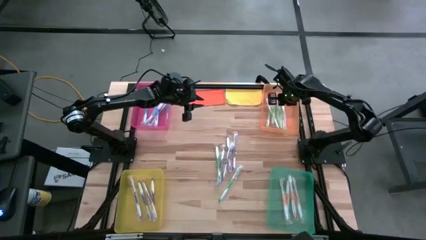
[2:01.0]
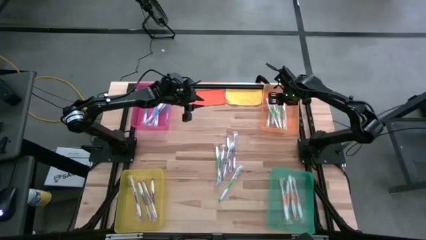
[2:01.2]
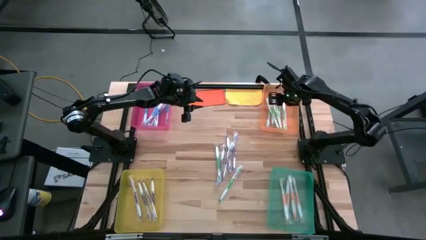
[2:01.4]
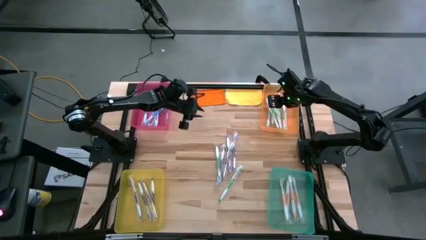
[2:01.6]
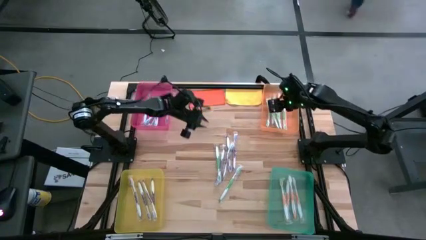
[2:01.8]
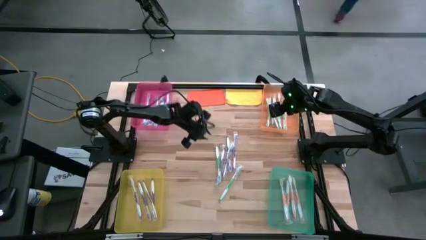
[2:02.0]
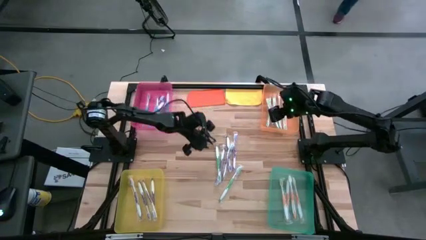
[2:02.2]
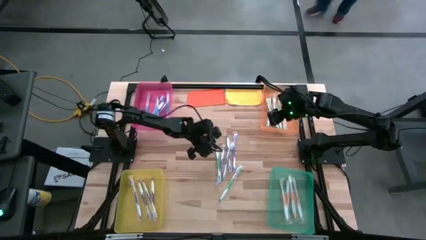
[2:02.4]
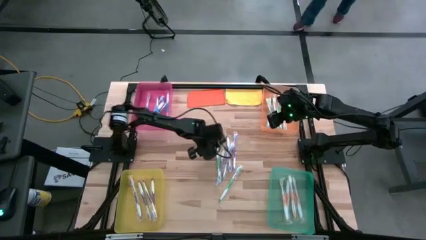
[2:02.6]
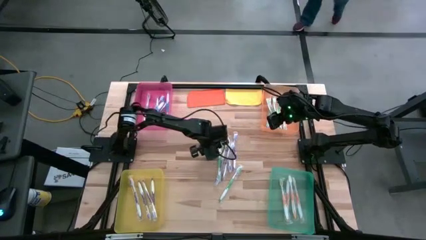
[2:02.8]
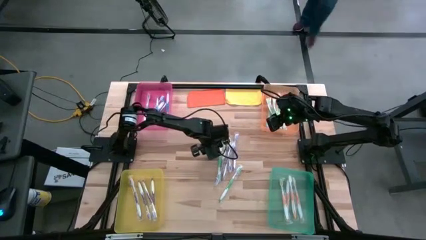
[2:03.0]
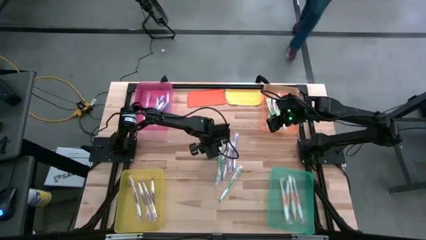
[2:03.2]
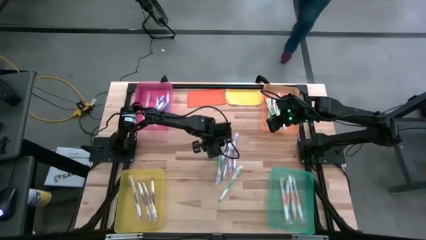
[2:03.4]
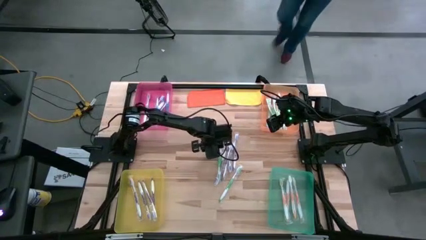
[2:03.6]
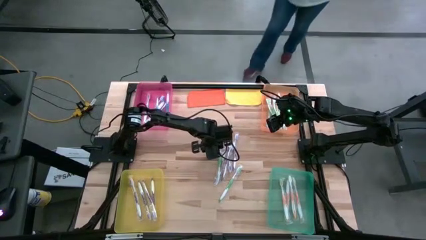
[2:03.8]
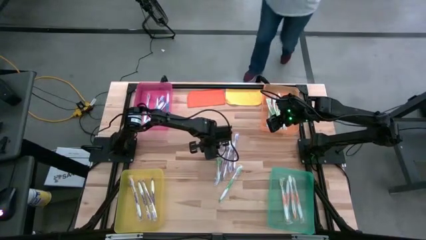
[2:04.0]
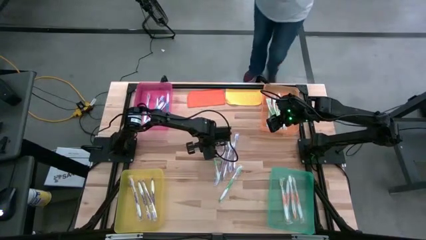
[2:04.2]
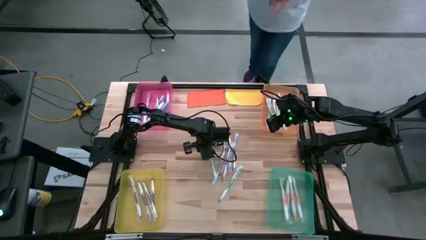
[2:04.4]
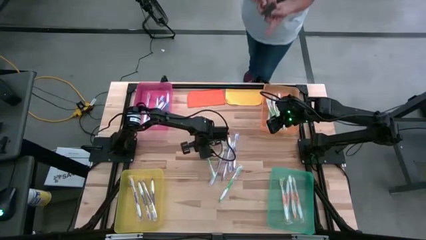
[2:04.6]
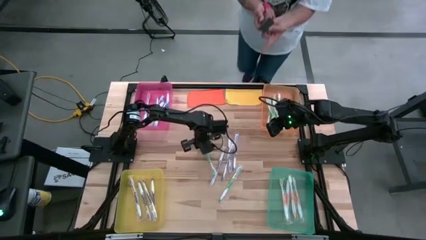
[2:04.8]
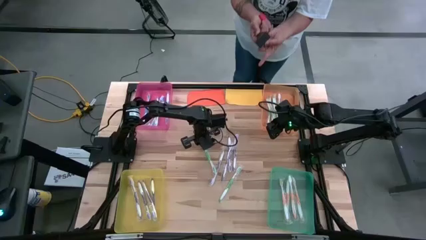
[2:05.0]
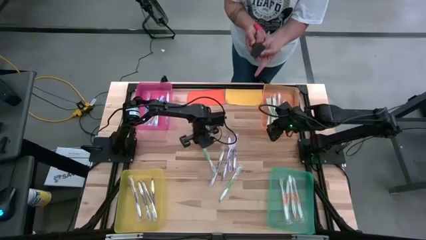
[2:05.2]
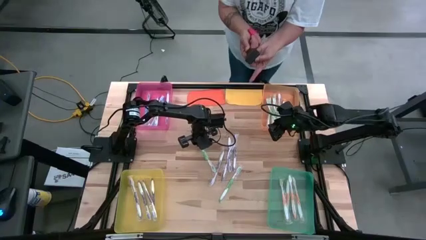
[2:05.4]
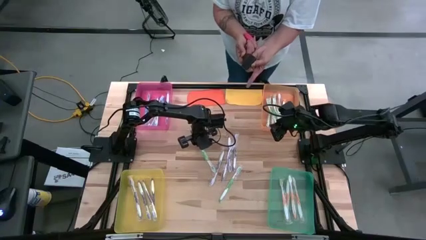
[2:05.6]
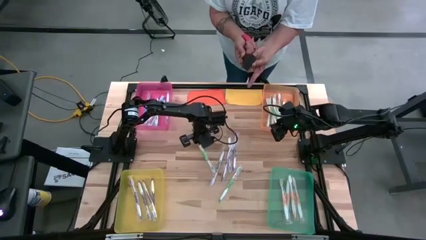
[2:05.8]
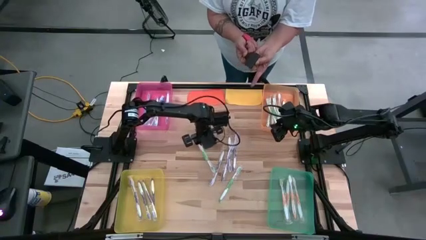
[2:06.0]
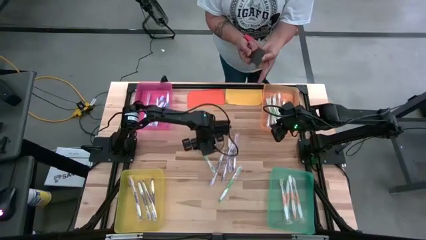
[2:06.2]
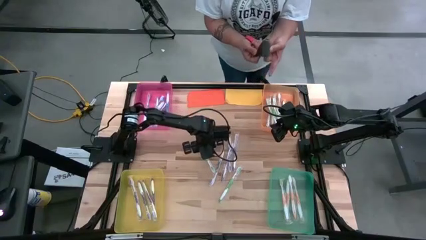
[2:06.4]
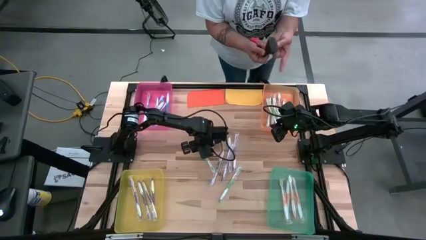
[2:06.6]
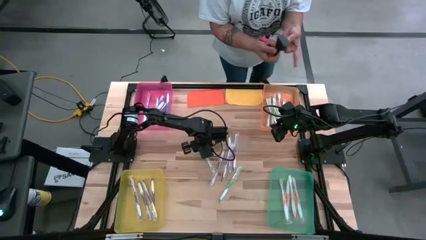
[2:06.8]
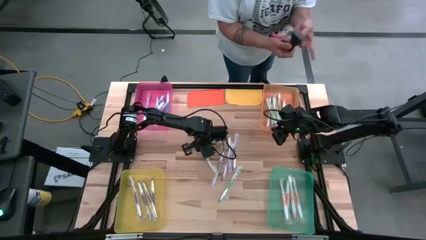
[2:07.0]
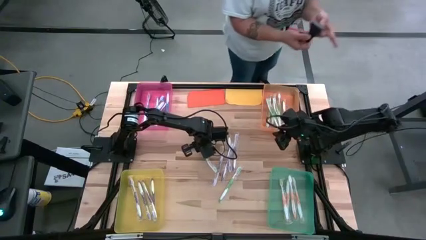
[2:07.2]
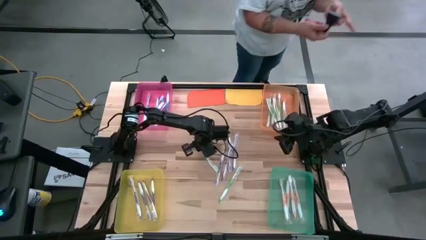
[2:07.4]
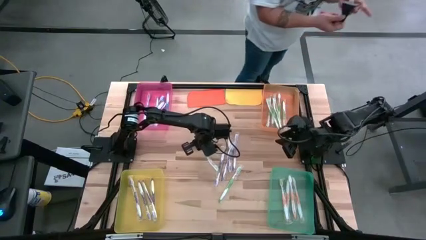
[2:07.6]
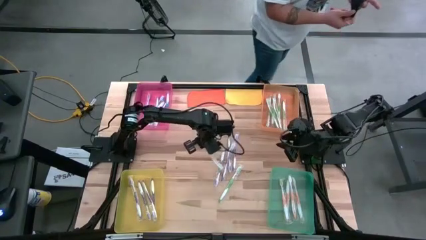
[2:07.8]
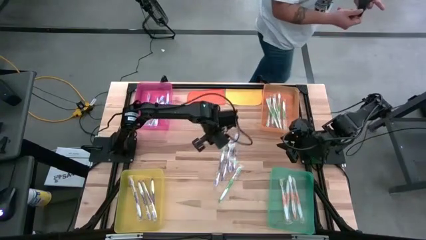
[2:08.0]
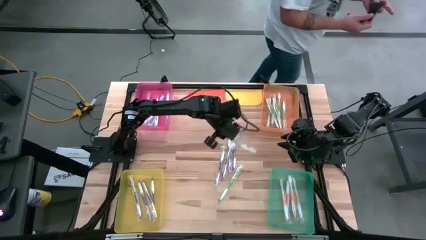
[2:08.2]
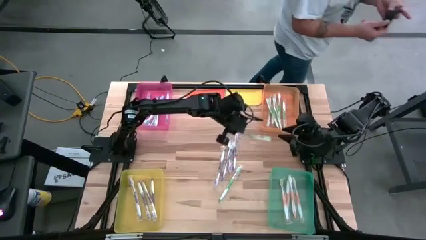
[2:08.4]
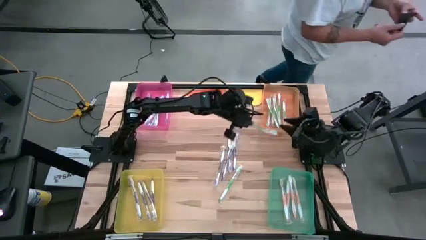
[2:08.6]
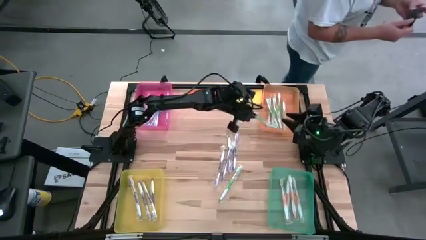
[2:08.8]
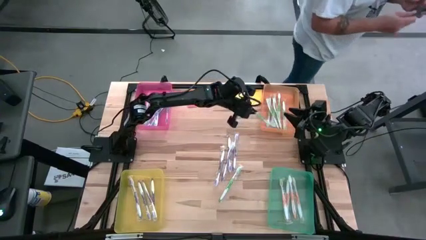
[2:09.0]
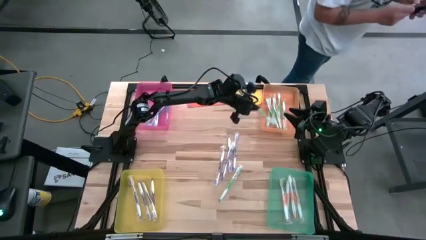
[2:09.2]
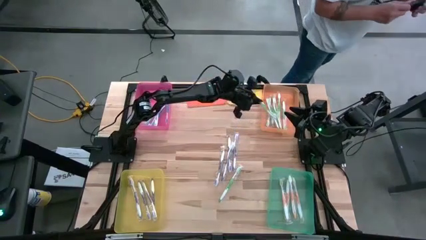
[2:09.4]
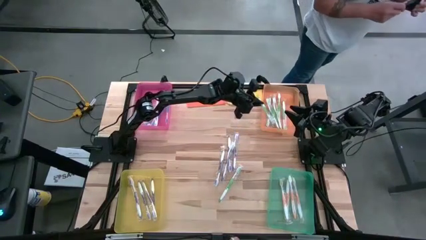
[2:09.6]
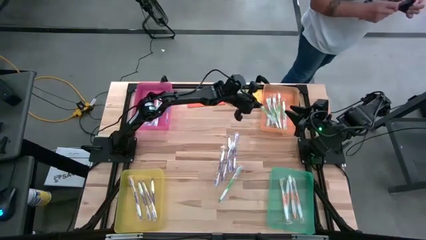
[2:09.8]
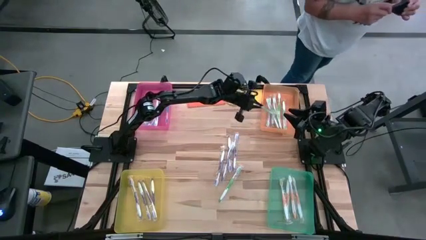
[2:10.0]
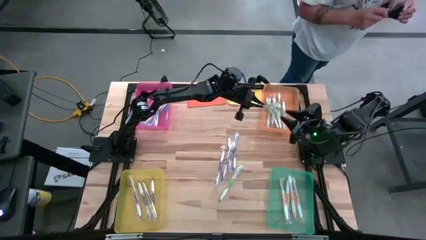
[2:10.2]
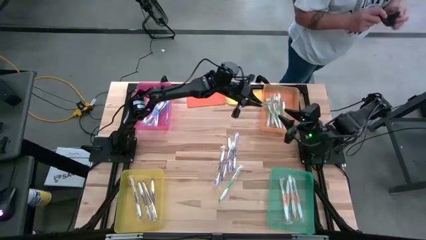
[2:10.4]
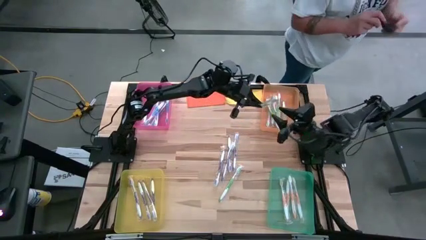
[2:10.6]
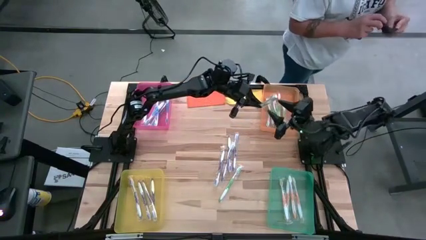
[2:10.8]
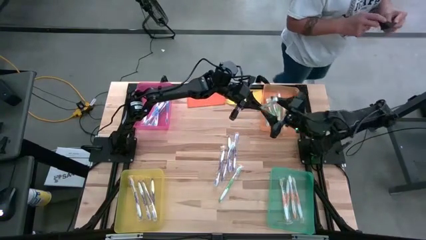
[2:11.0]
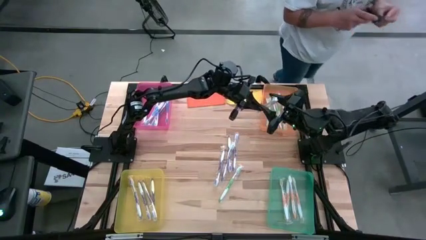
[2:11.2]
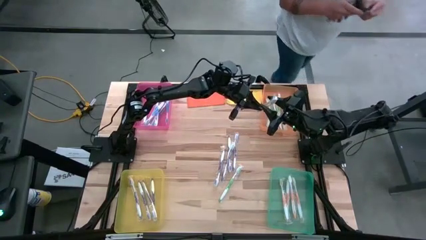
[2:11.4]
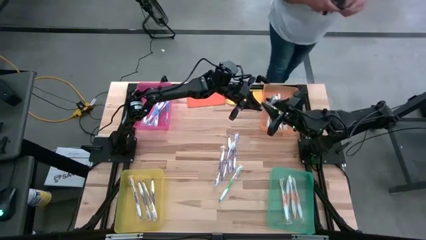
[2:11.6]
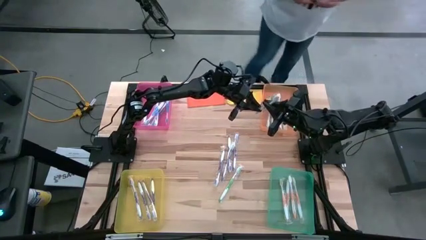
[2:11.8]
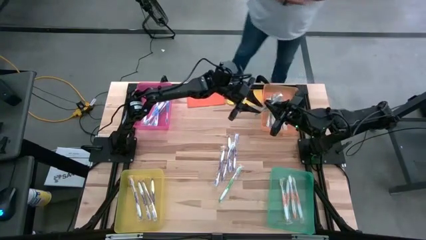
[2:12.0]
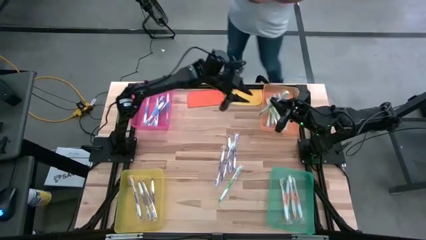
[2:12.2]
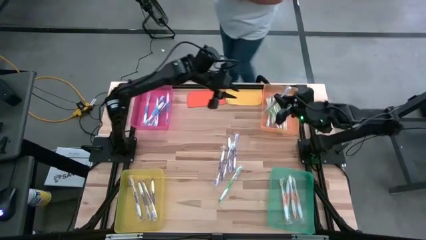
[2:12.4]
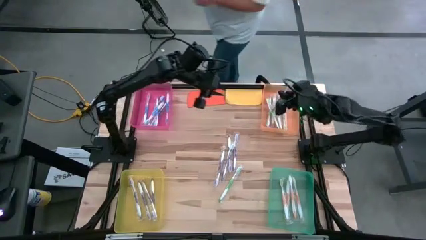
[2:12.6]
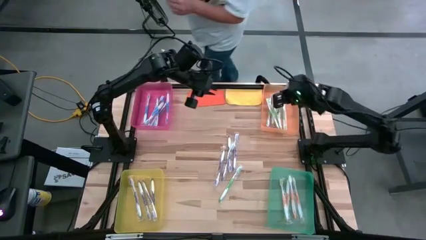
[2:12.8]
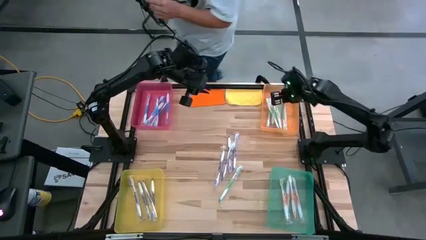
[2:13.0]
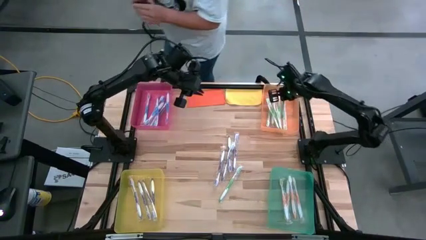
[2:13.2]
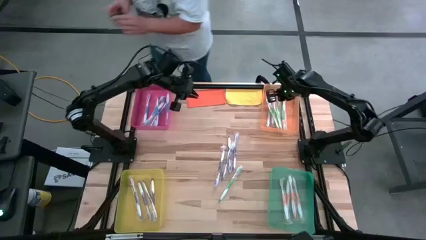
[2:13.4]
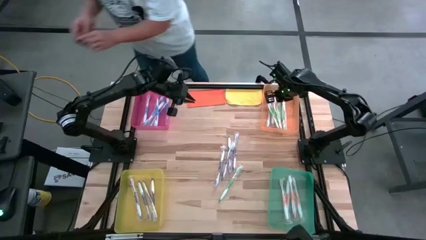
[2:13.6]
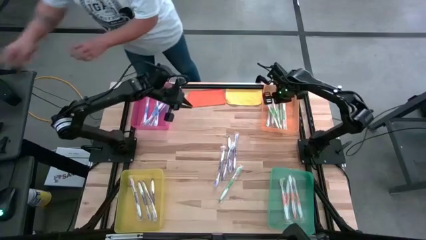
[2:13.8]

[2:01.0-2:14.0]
Task: Pick & Place Toothbrushes
Put the green toothbrush into the orange bin

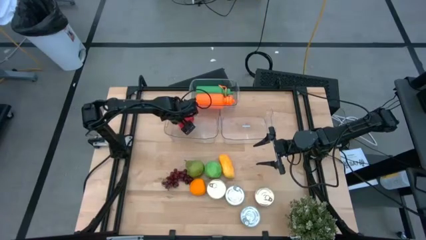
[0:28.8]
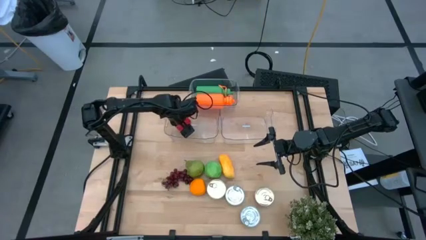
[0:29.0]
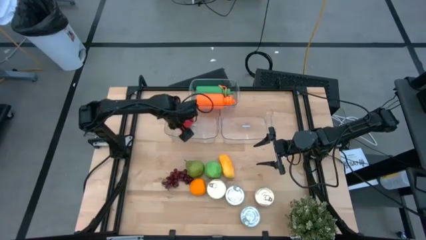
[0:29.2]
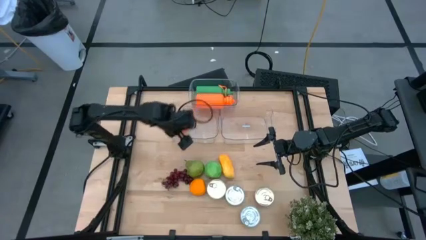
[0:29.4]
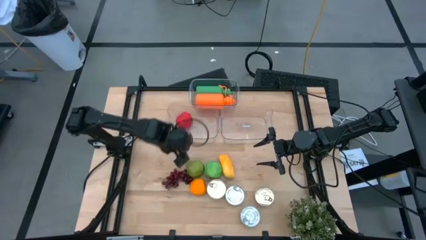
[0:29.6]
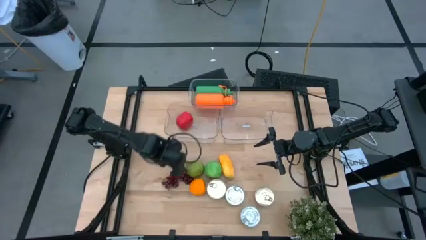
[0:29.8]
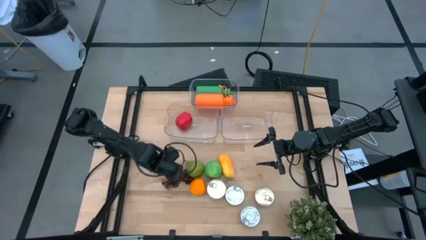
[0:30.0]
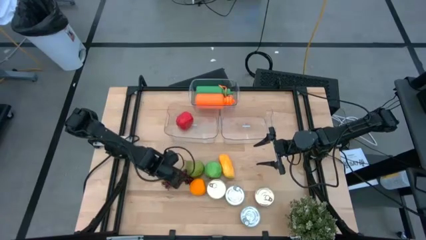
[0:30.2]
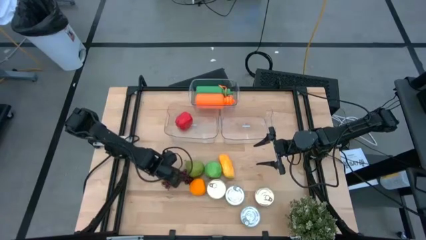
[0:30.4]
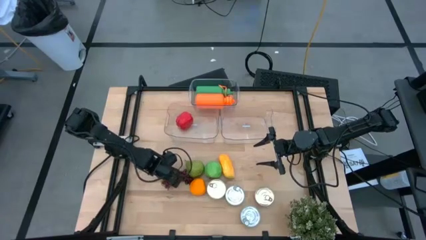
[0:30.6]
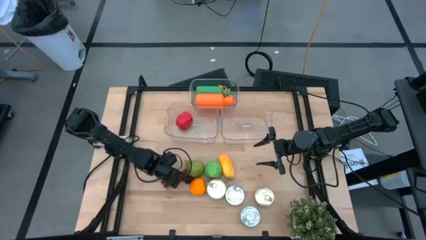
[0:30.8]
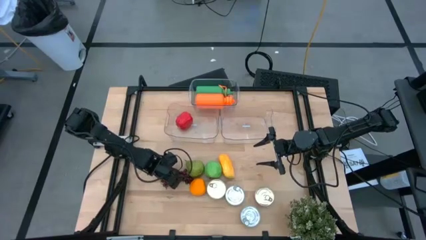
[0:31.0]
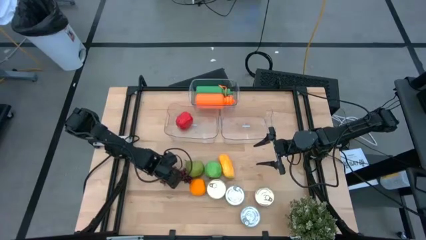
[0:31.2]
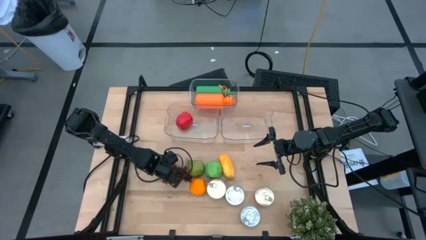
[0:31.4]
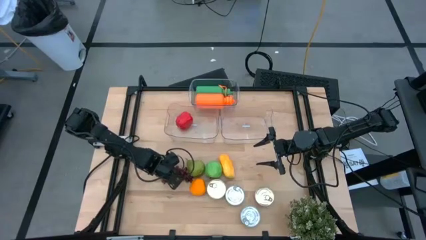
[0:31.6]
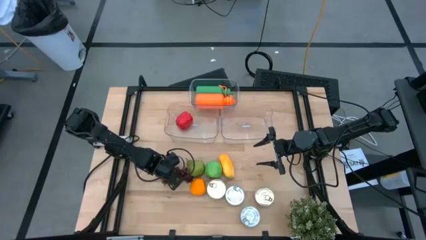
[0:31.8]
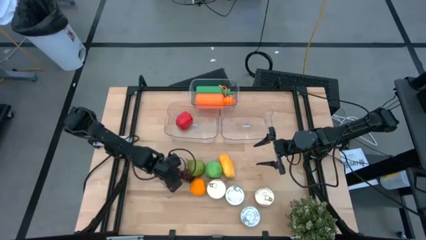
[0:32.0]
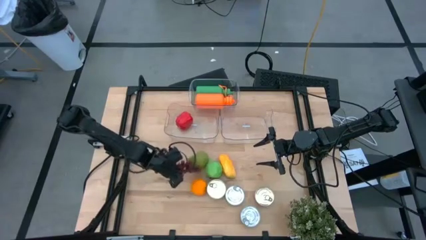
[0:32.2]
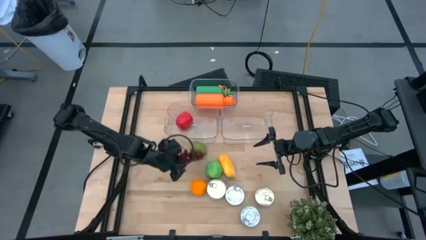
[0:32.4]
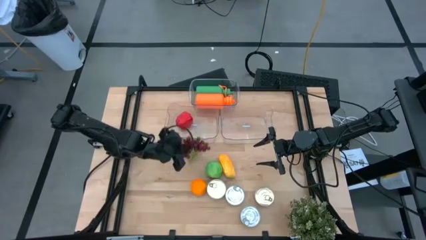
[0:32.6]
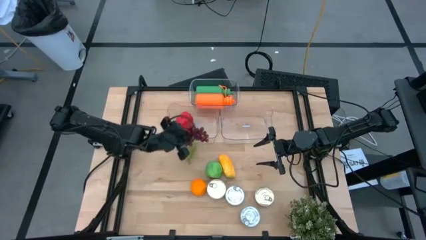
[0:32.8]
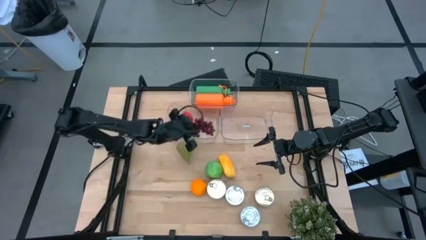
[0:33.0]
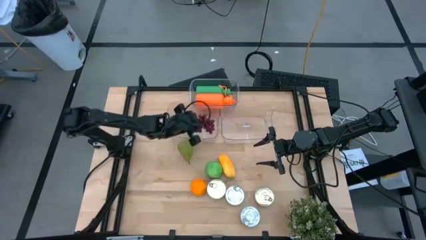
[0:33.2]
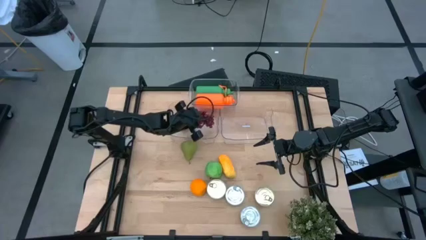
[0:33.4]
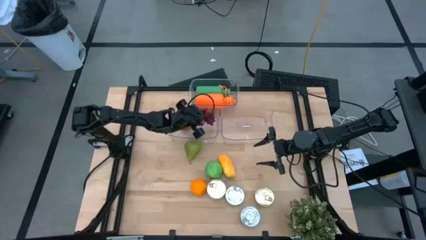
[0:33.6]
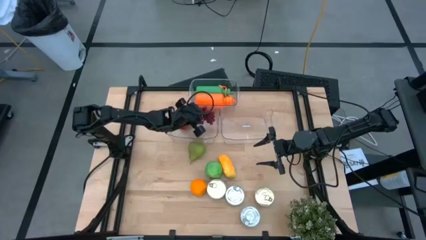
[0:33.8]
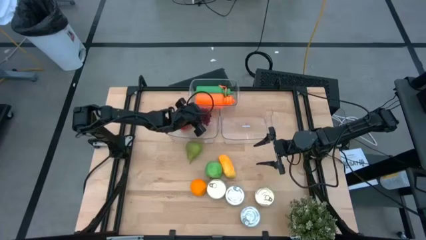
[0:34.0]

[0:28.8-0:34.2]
Task: Pick & Place Food Item
Put the grapes into the bottom left transparent bin
